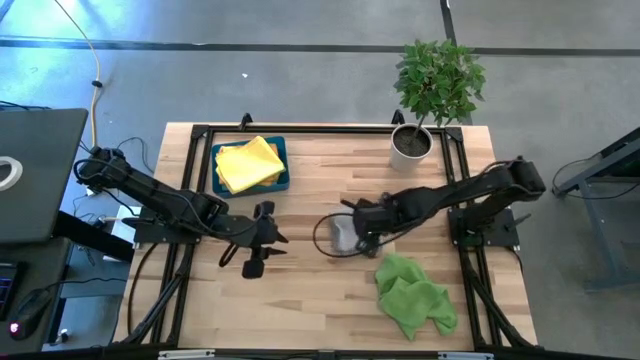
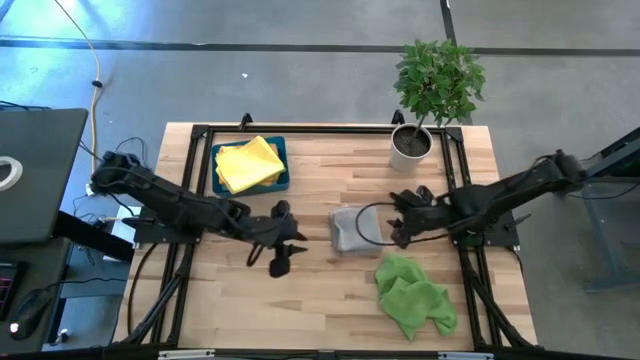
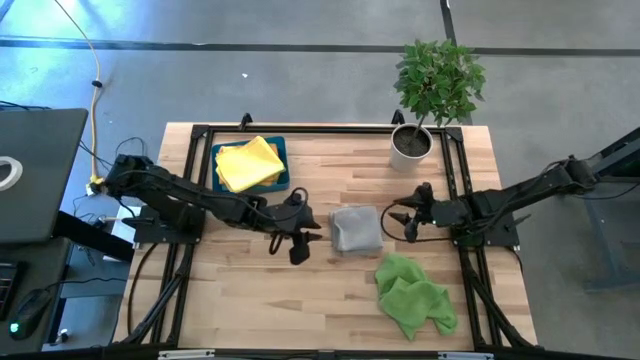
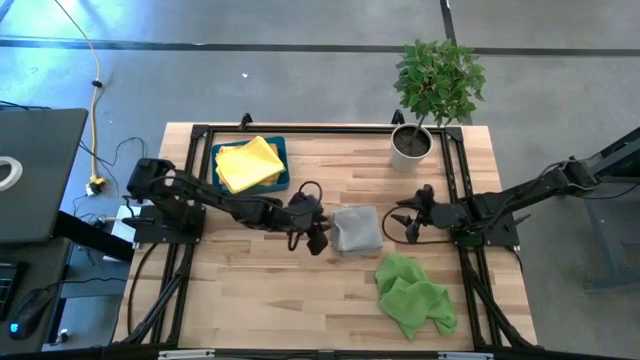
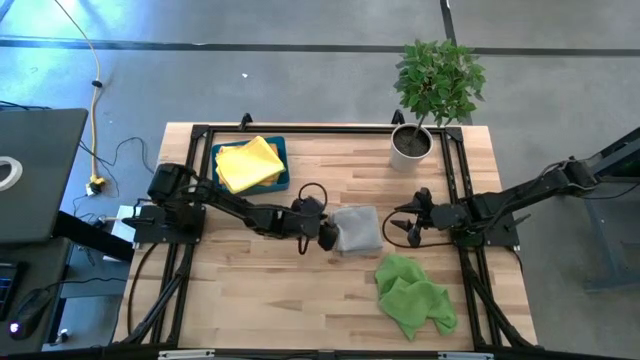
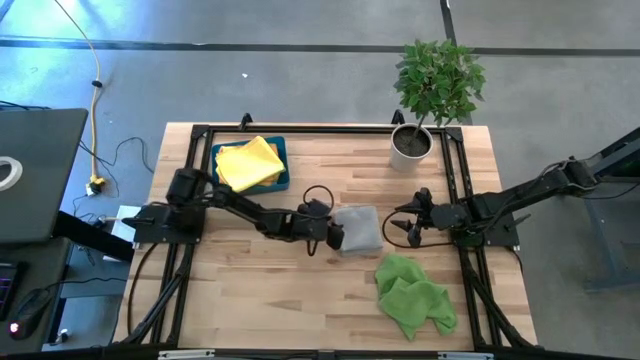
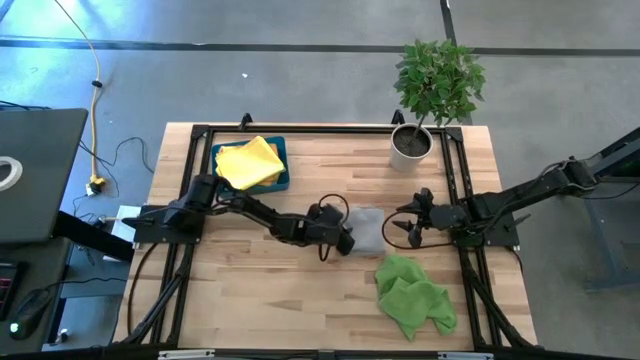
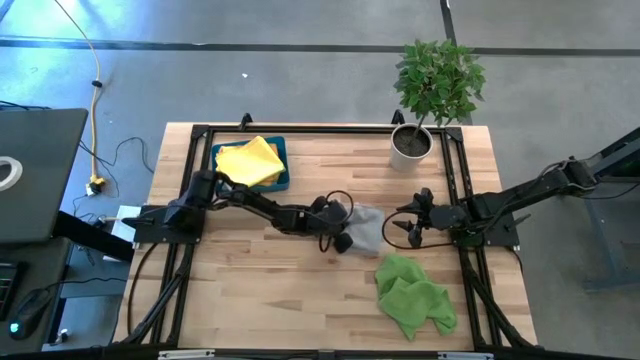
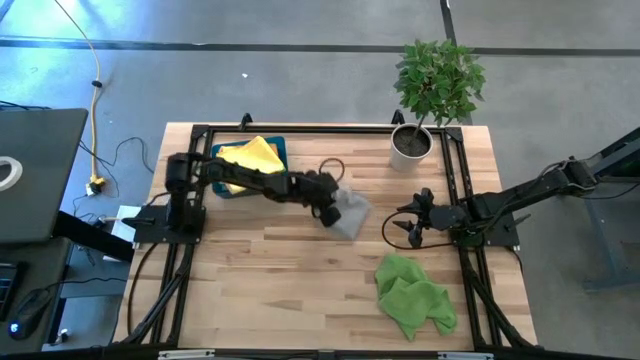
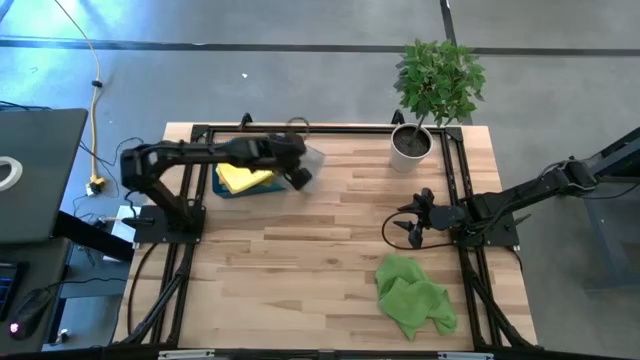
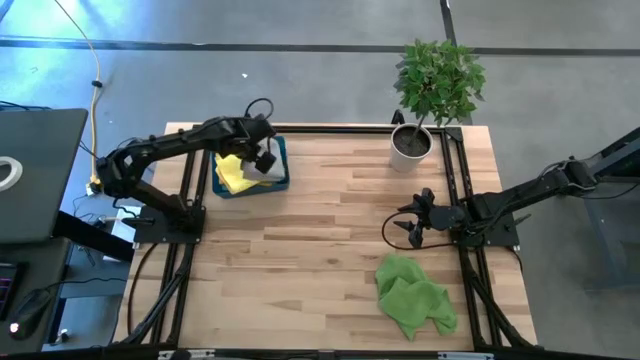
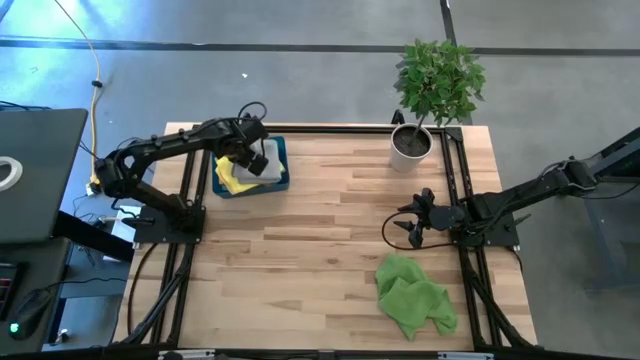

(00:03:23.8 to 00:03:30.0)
Task: Fold microfiber towels
Put the folded gray microfiber cloth into the blue bin

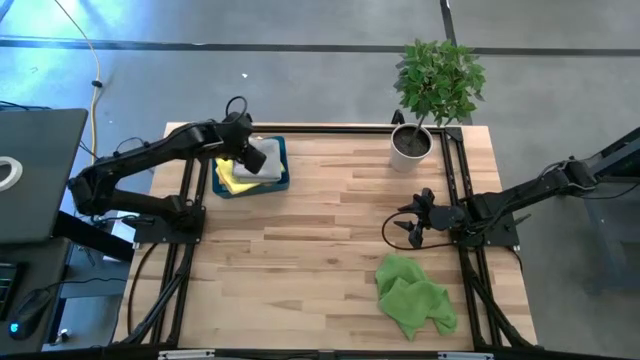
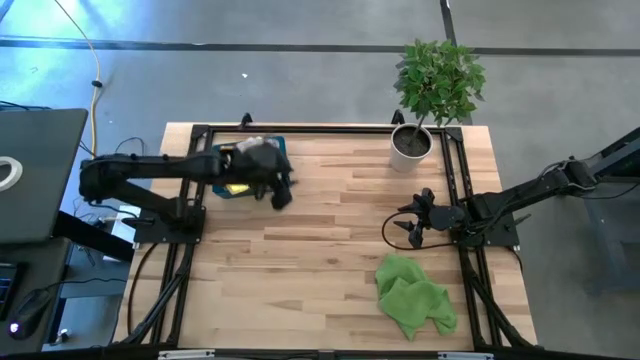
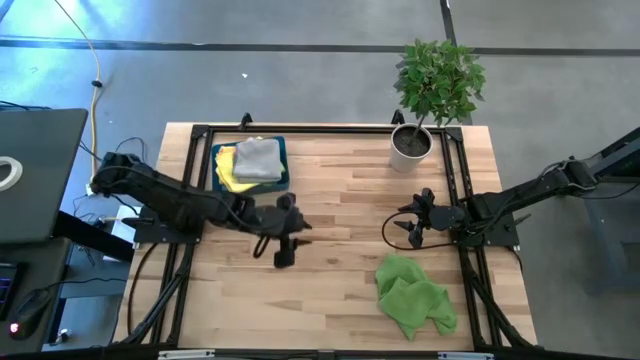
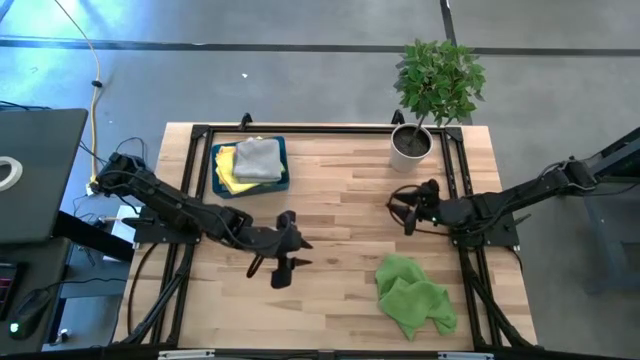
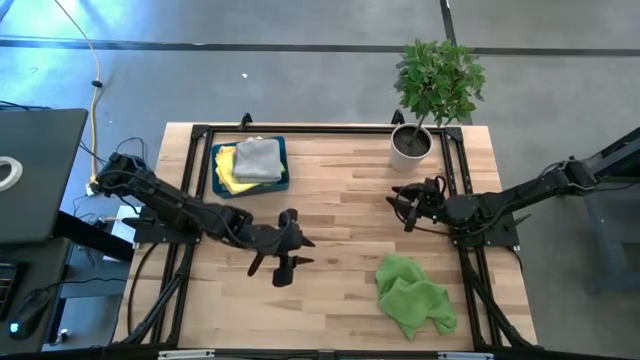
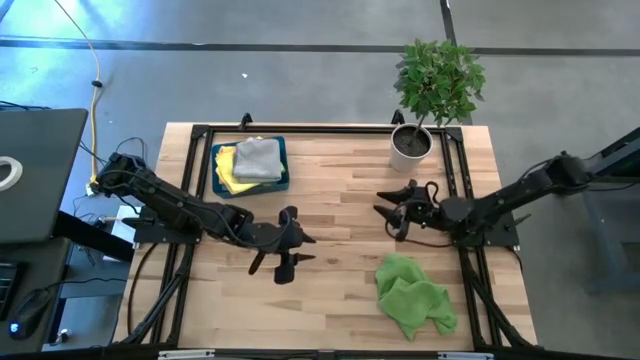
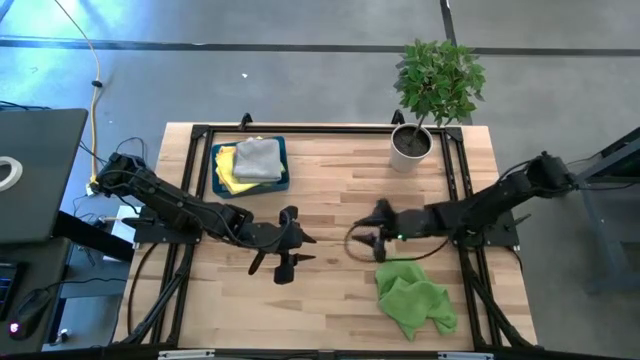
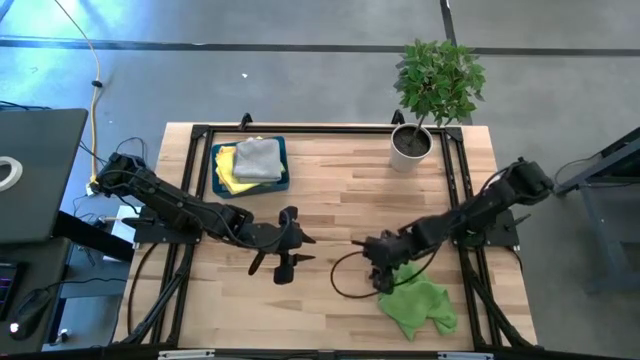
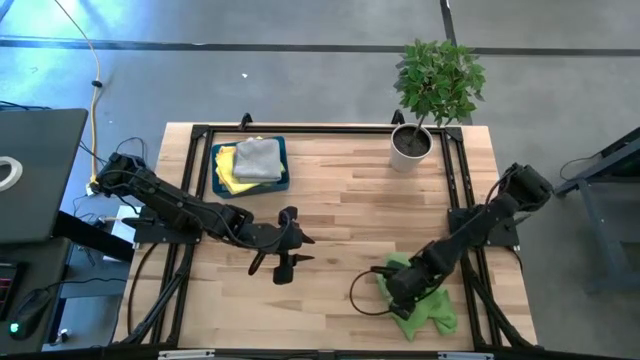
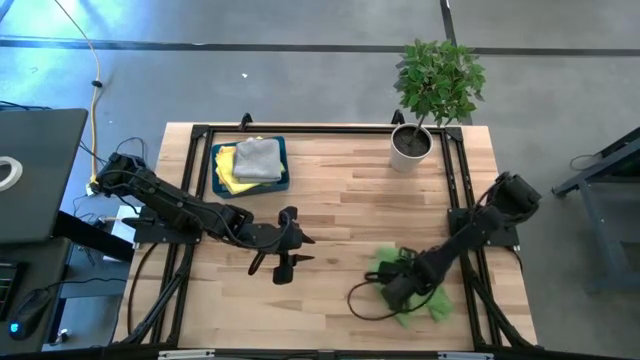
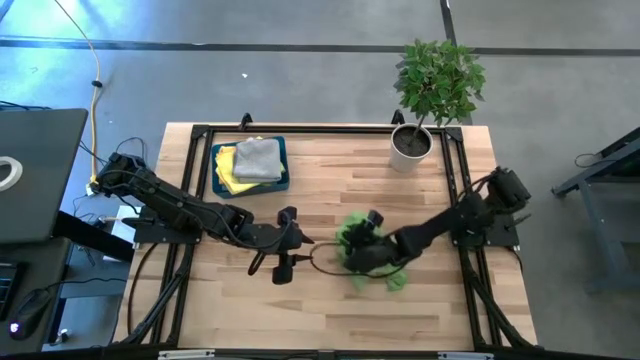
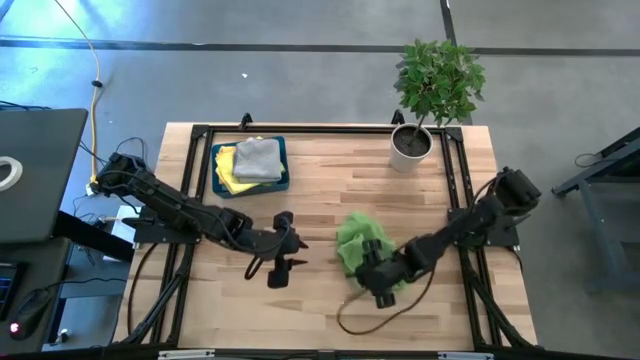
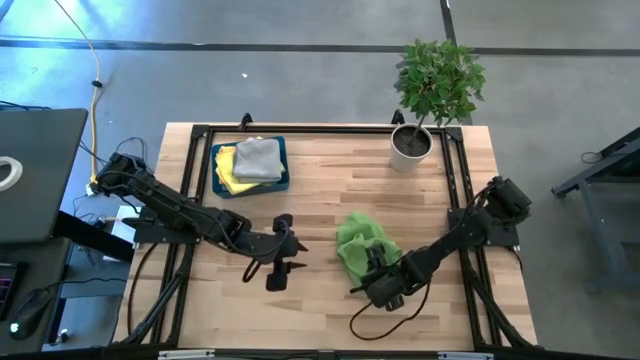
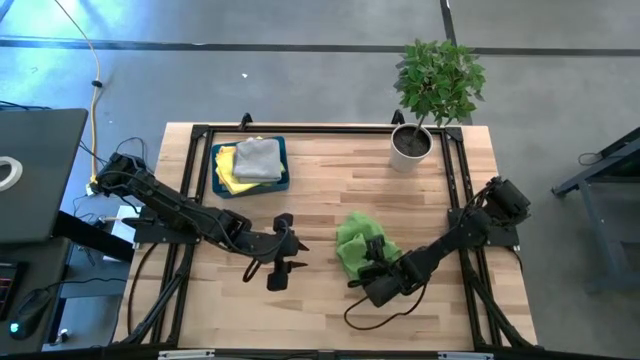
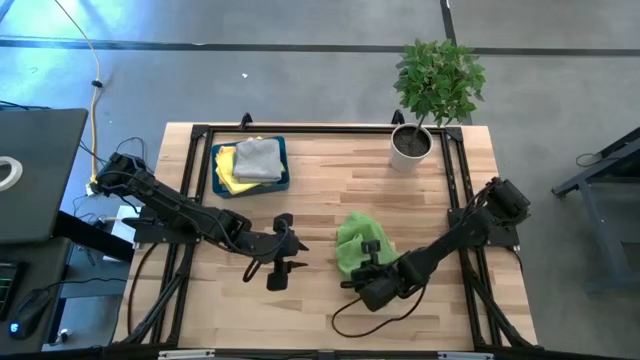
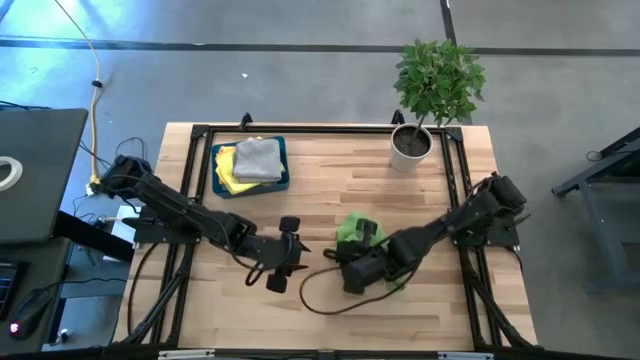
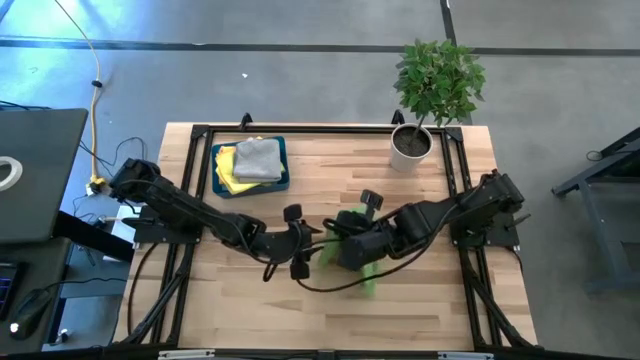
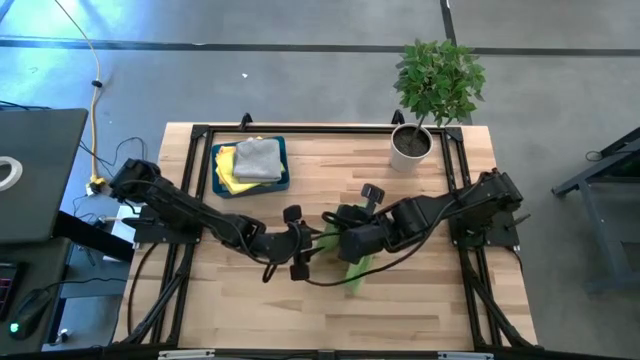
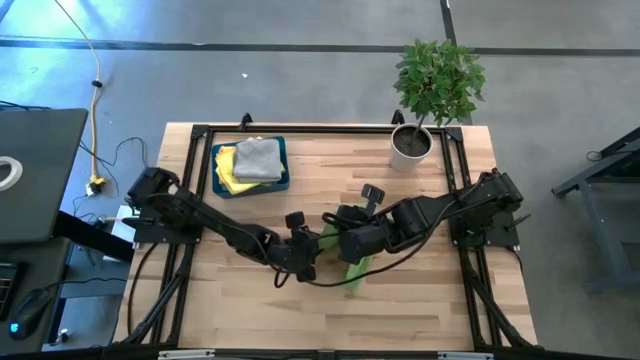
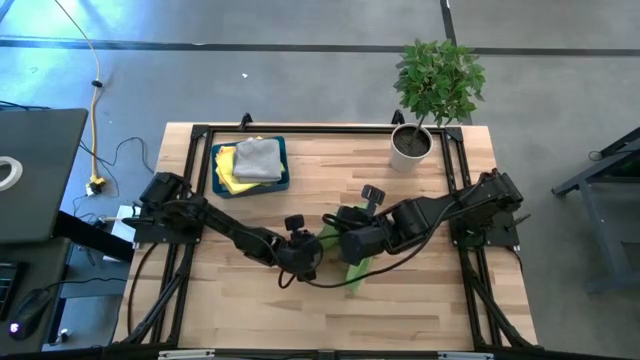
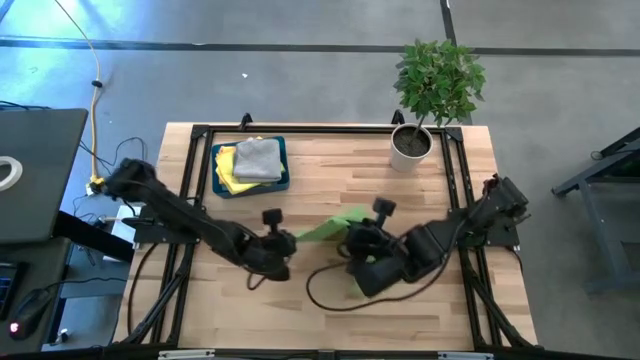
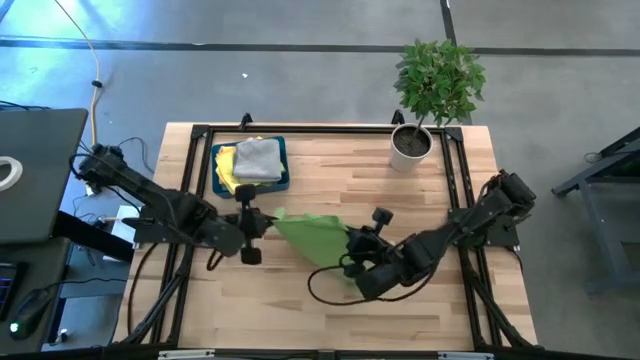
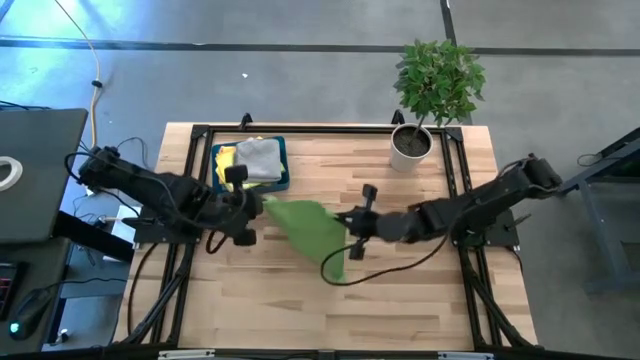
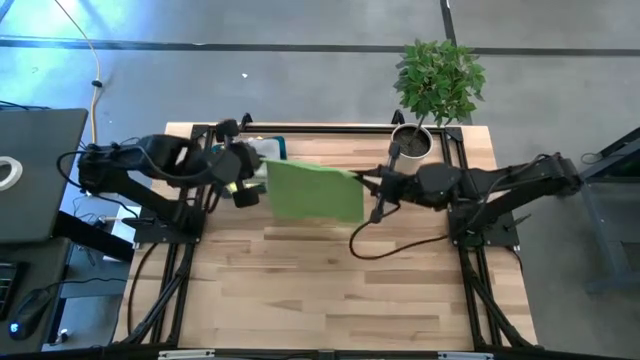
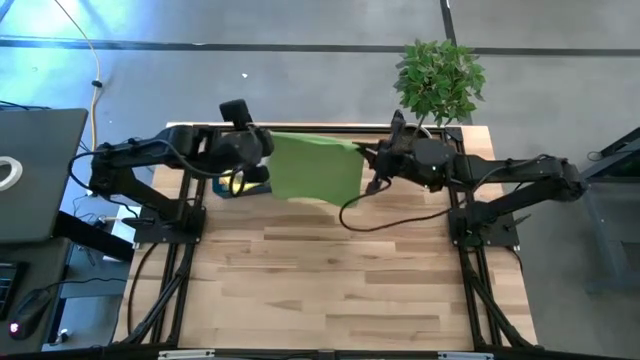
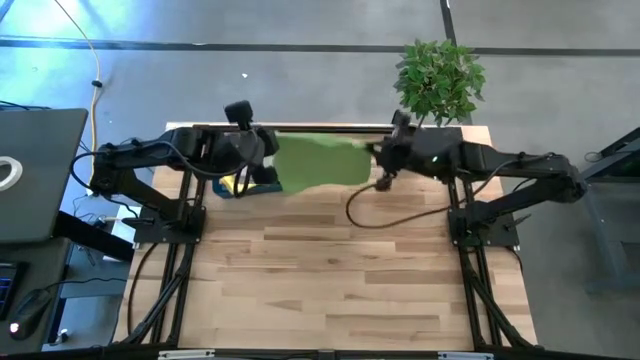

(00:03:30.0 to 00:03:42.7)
Fold the green microfiber cloth

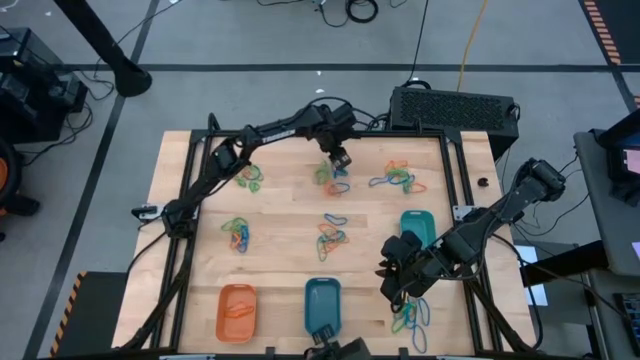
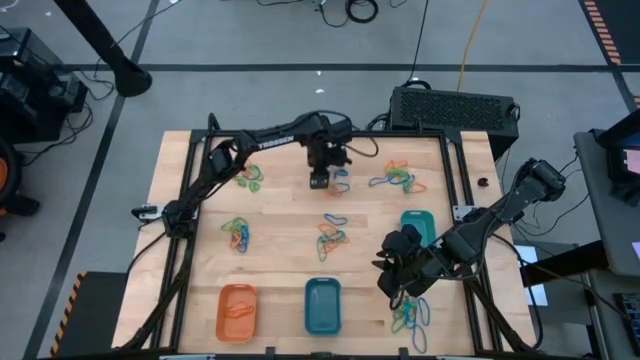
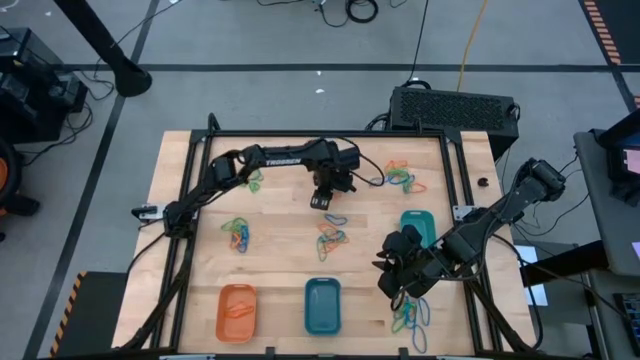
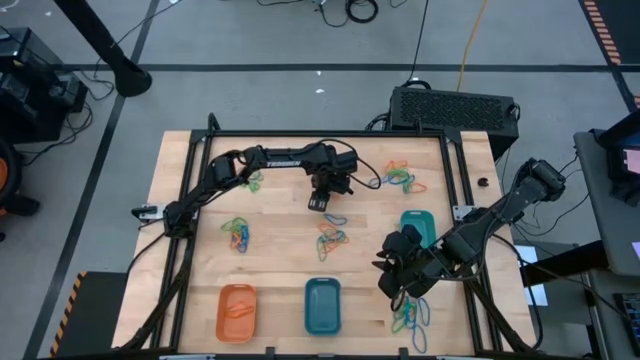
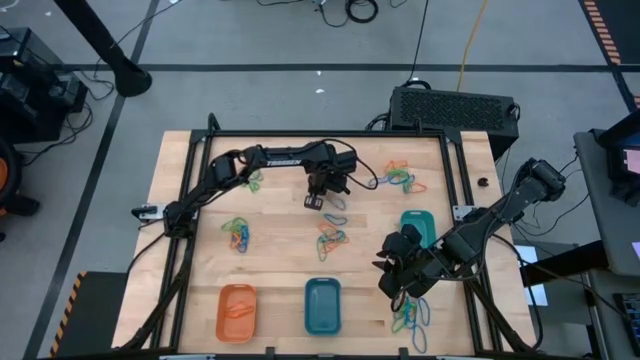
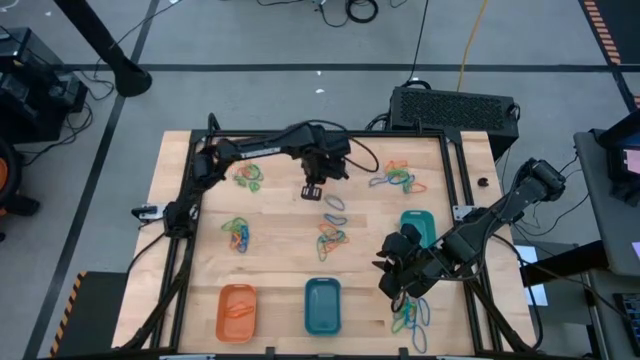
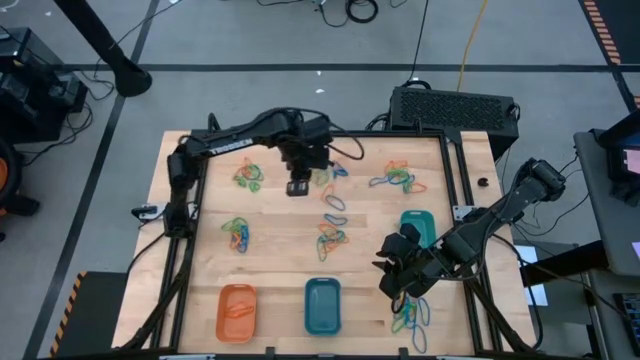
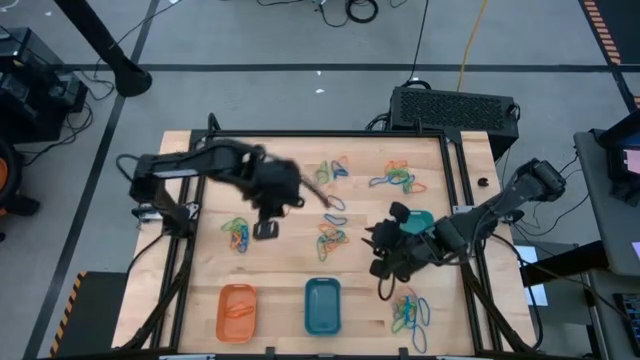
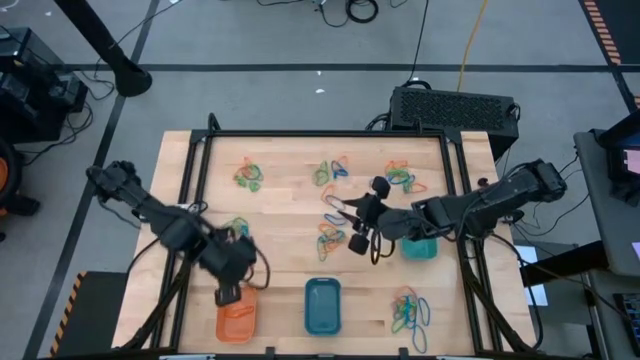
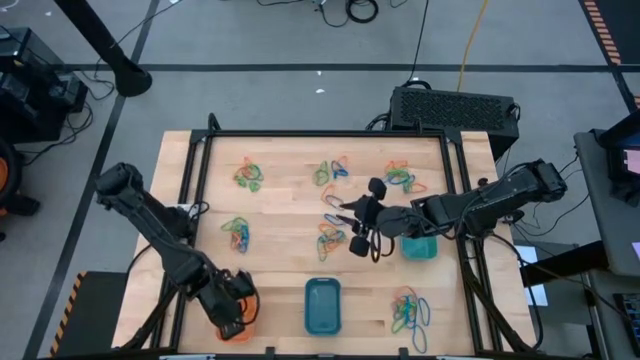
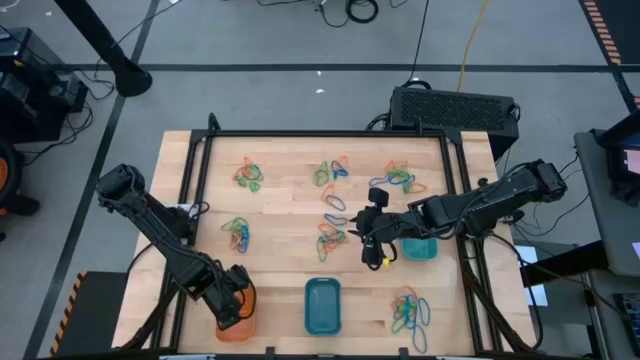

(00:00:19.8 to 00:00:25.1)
Task: Sort rubber bands into baskets
Put the orange rubber band into the orange bin
